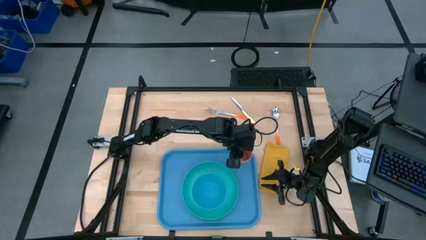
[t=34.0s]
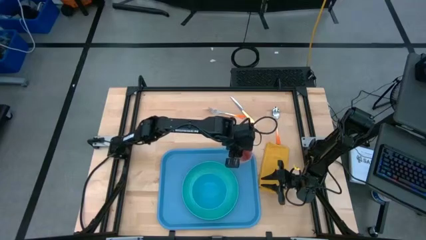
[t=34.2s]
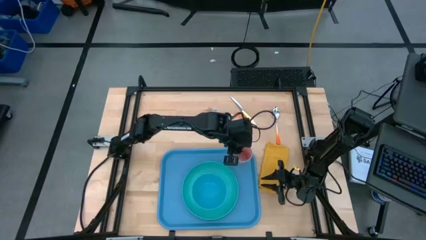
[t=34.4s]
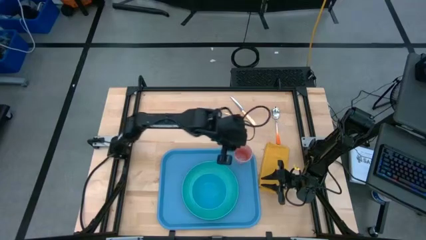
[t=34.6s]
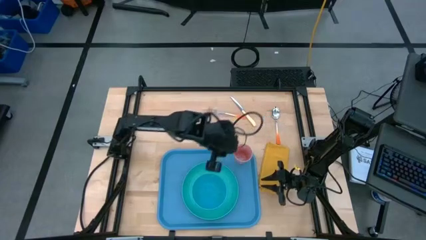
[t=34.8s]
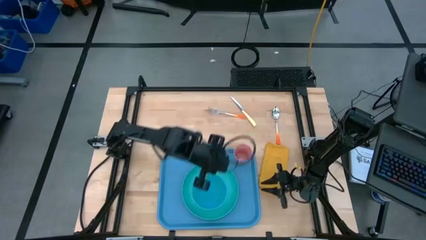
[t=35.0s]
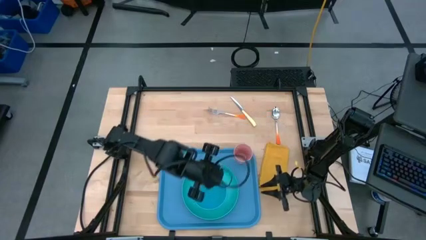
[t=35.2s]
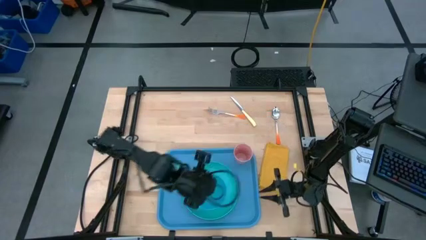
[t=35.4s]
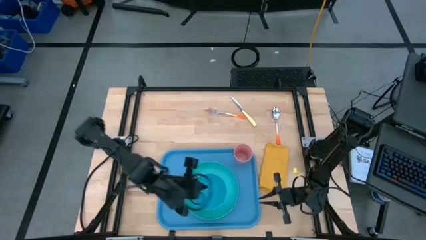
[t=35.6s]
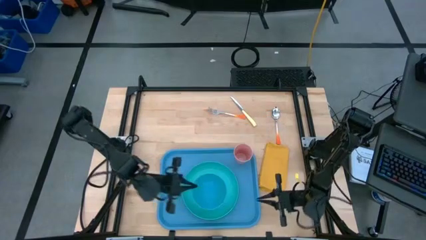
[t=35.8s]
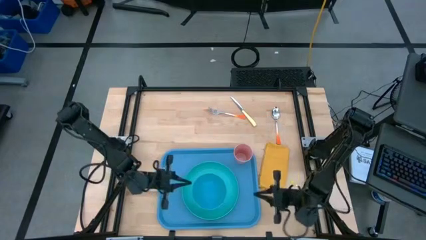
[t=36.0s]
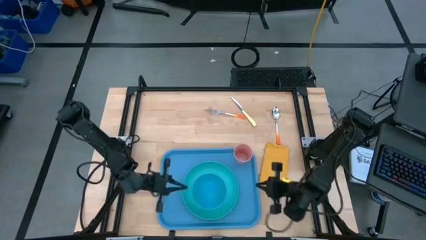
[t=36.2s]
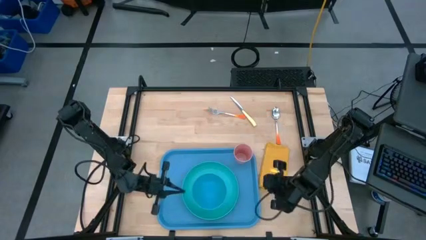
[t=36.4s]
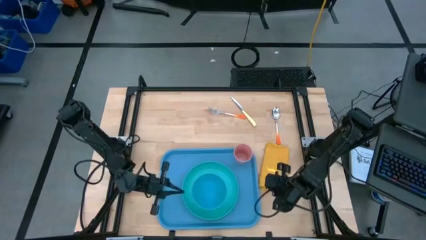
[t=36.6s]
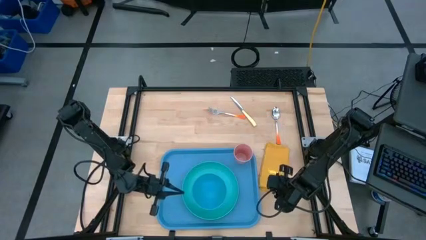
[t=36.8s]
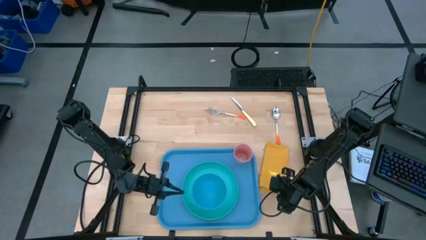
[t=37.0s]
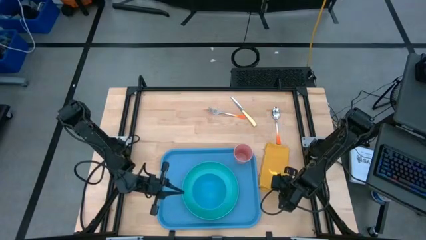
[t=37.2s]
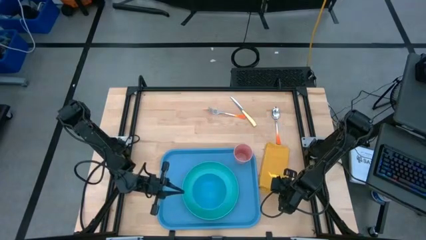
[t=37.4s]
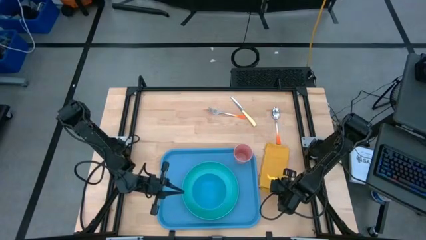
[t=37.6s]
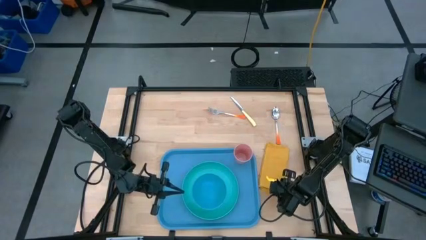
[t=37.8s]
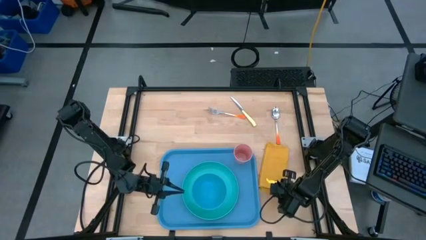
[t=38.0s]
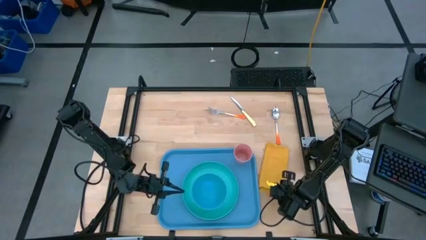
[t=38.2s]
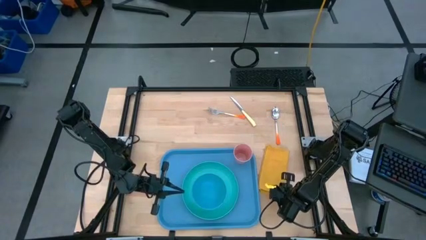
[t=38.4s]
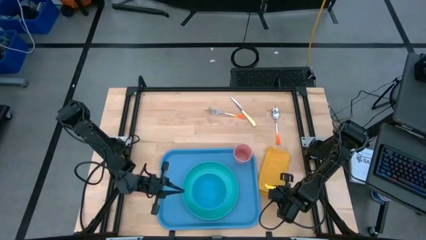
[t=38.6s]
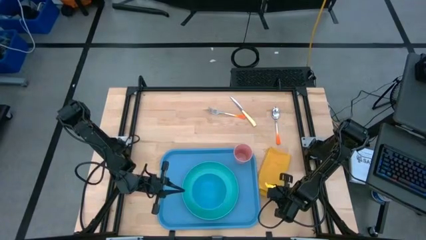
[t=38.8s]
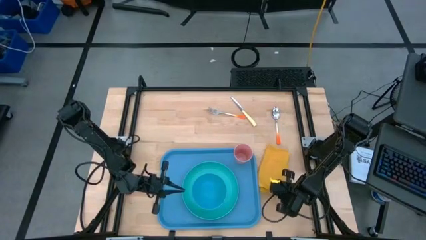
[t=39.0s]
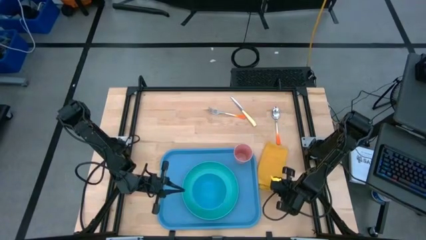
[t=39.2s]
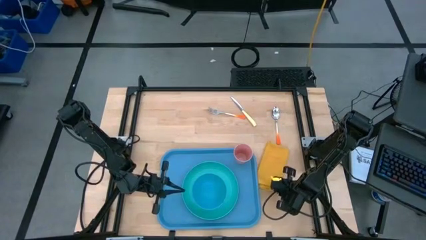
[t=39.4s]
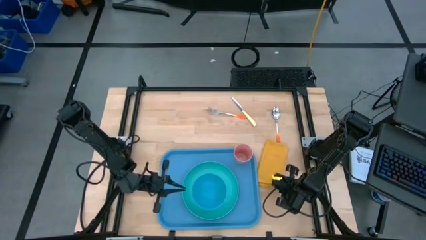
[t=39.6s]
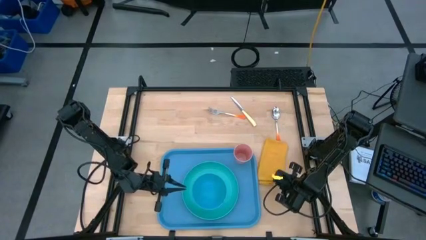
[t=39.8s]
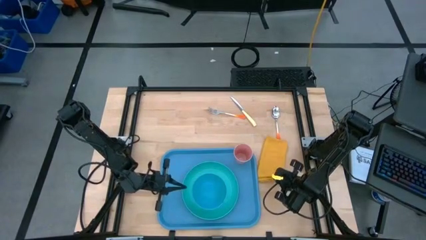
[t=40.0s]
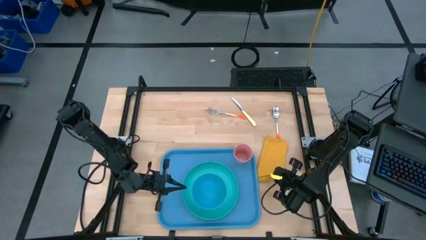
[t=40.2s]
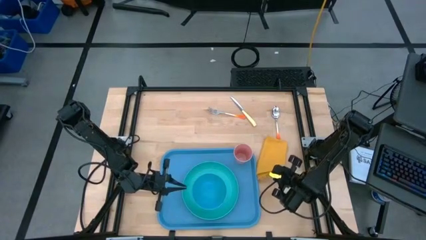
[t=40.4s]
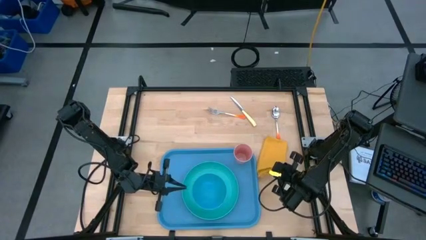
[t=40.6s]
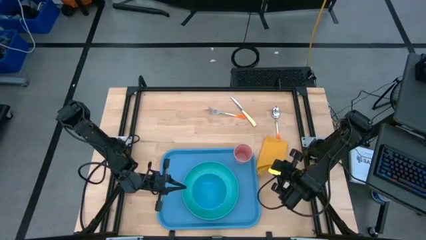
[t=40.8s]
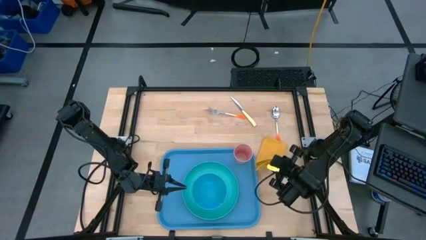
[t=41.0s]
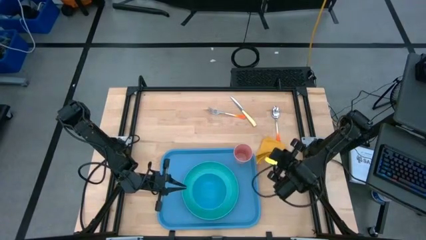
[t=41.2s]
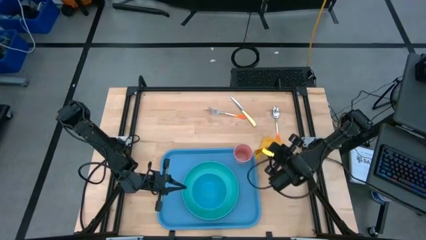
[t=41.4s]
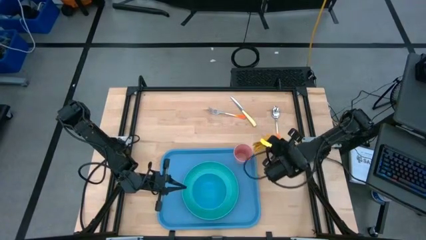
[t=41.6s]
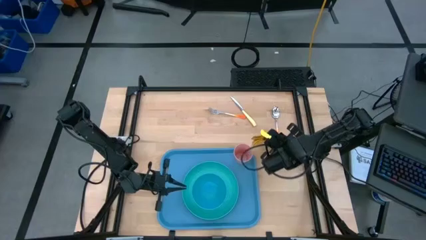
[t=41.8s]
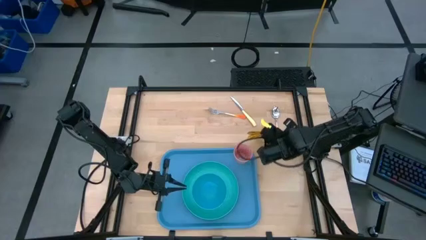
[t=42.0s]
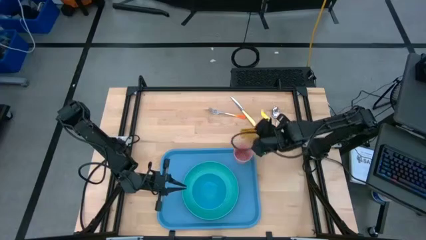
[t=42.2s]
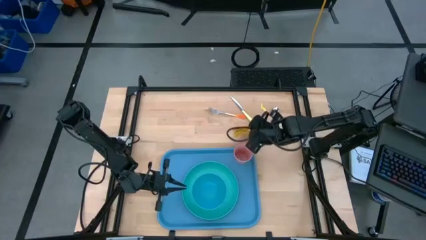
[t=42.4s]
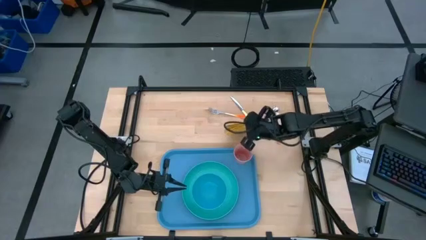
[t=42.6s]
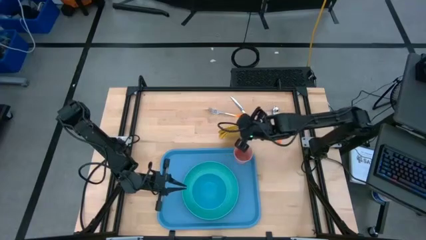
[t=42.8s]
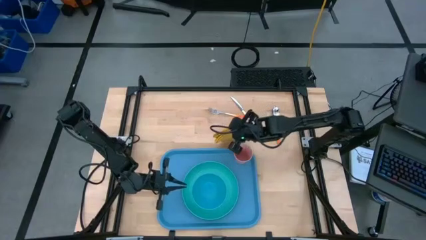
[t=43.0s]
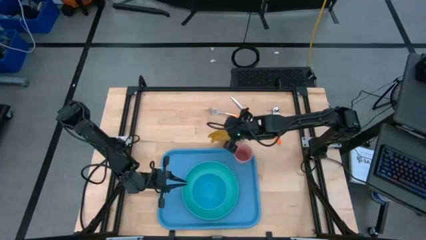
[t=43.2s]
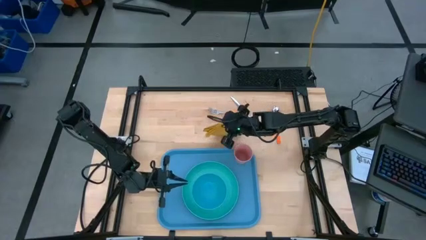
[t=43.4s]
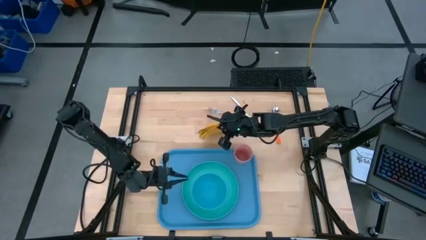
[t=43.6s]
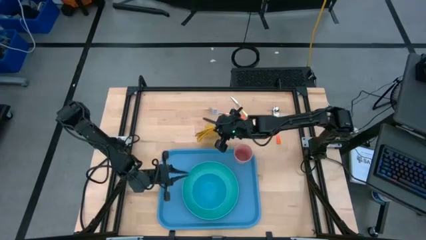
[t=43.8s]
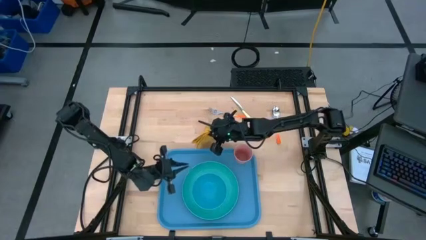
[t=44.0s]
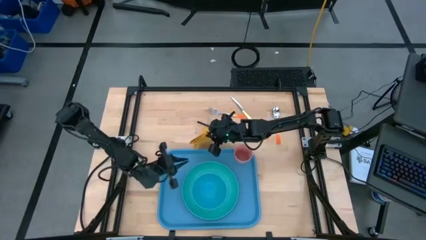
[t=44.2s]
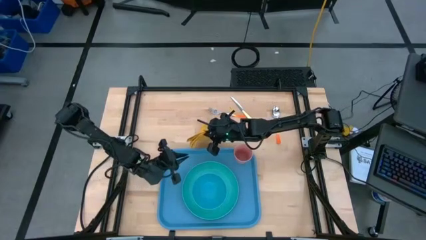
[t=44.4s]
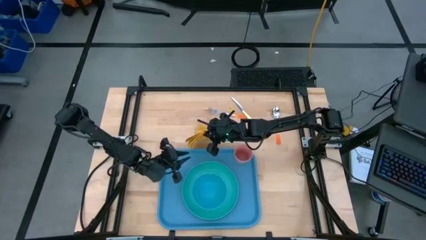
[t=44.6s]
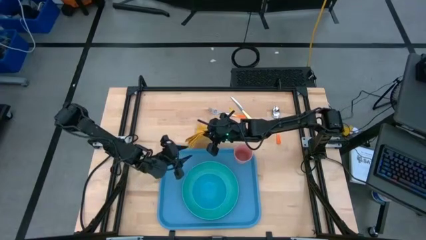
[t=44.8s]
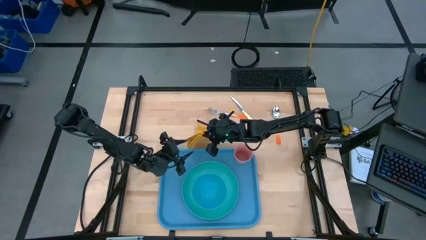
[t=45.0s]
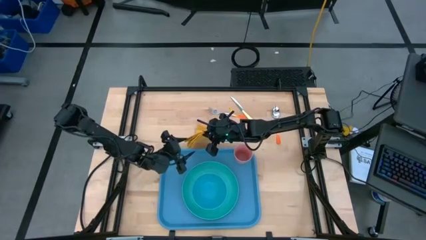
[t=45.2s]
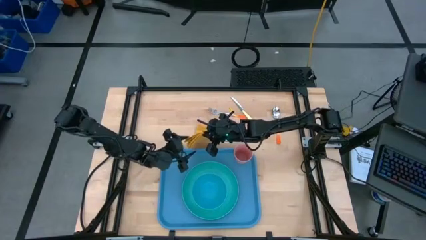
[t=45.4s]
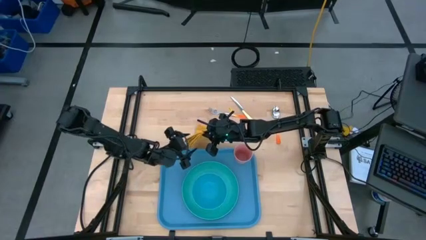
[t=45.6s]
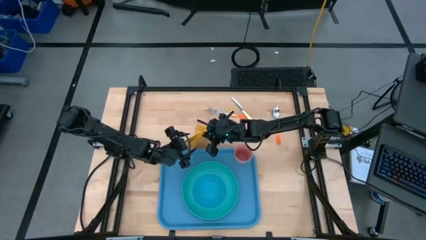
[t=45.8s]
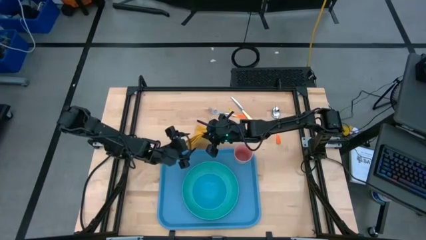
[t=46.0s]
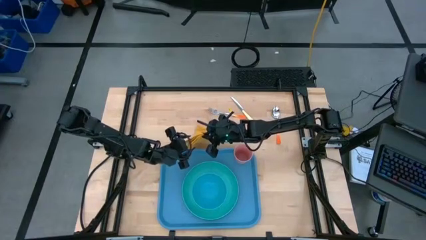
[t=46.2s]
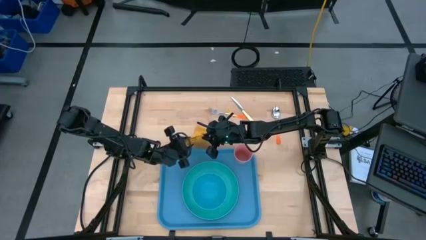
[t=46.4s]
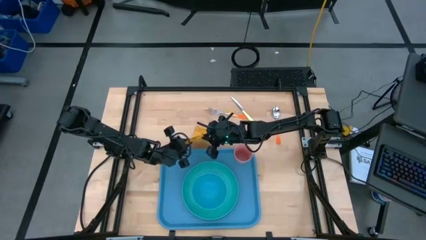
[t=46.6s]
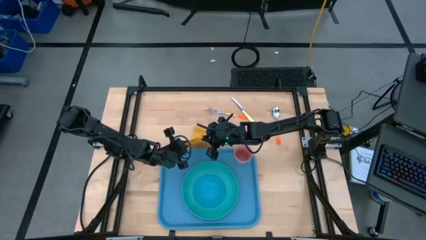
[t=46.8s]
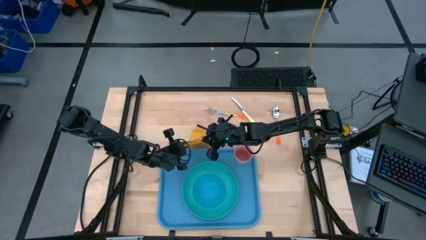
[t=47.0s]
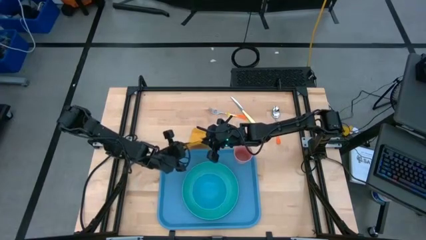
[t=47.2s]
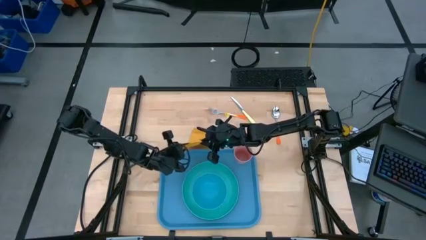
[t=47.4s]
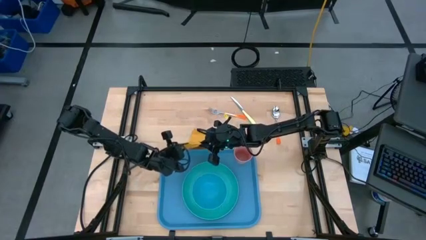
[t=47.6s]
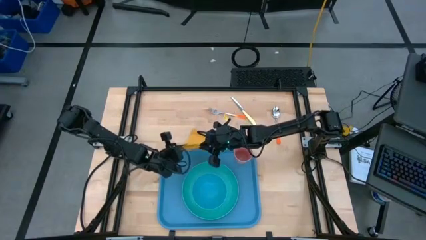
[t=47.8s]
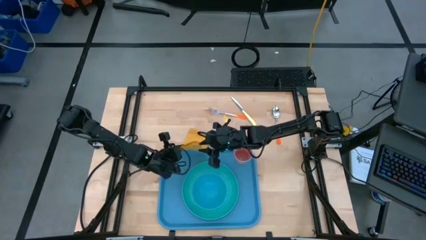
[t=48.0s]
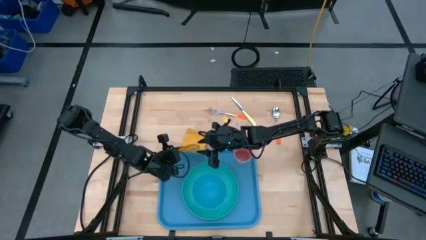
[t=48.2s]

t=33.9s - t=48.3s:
Task: Set up tray
Put the yellow table napkin on the blue tray to the left of the green plate
